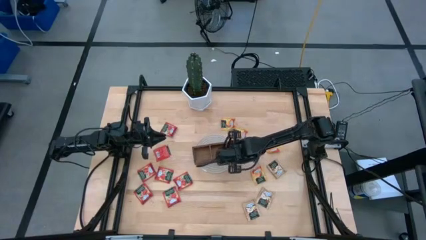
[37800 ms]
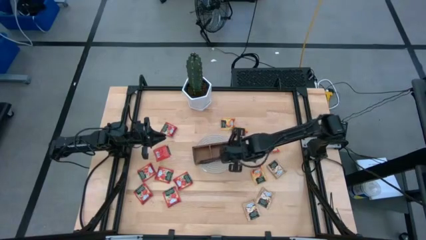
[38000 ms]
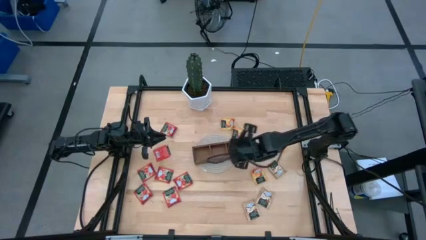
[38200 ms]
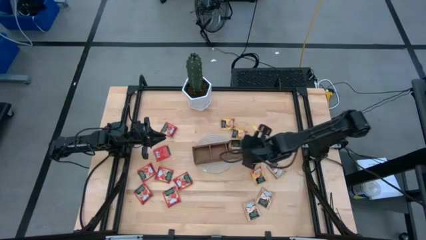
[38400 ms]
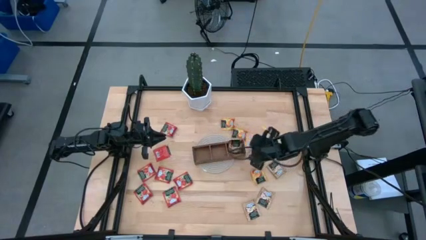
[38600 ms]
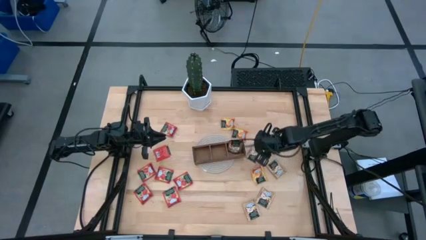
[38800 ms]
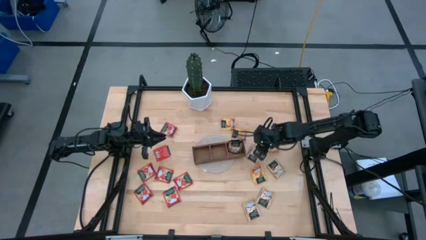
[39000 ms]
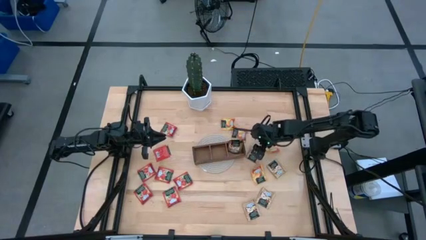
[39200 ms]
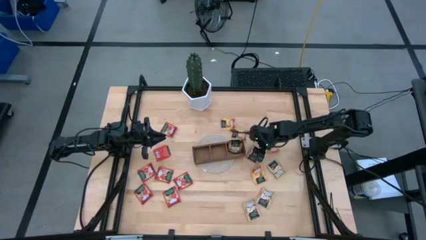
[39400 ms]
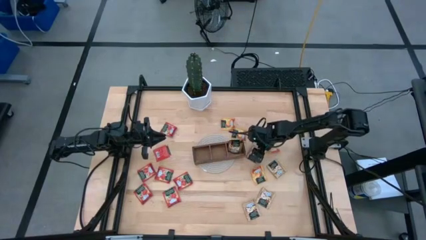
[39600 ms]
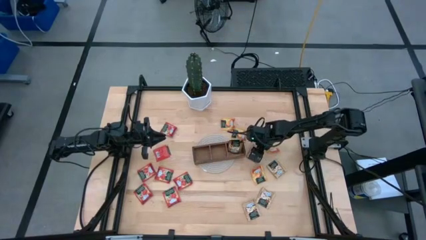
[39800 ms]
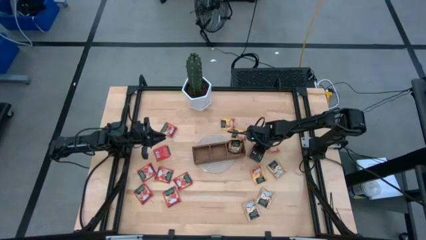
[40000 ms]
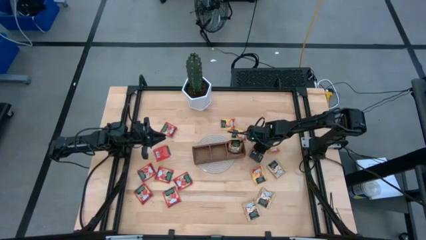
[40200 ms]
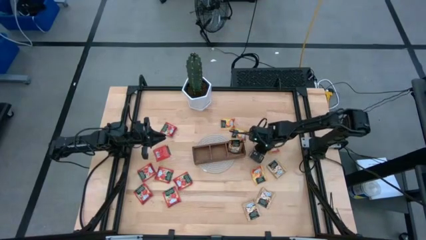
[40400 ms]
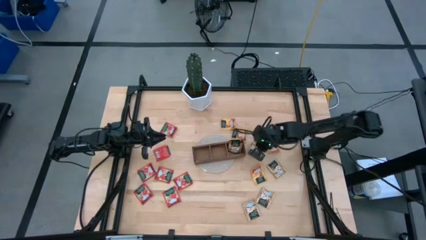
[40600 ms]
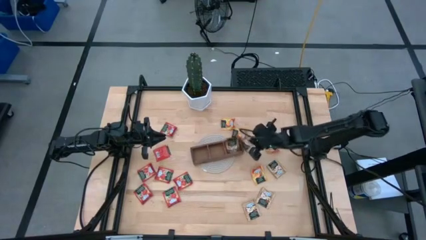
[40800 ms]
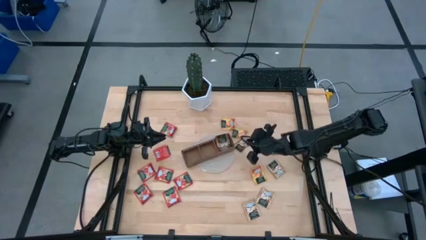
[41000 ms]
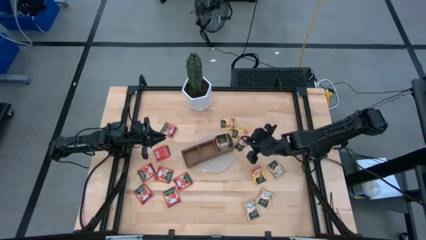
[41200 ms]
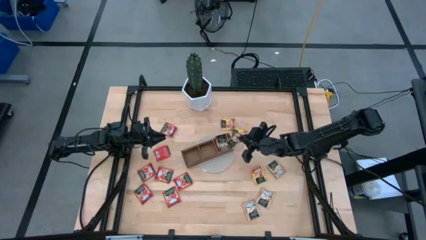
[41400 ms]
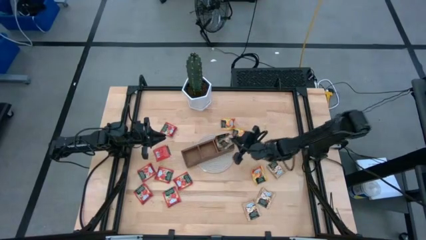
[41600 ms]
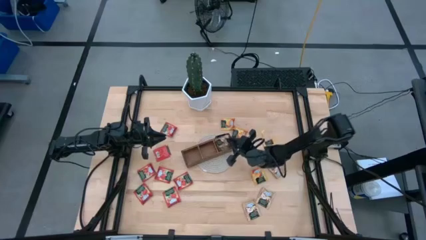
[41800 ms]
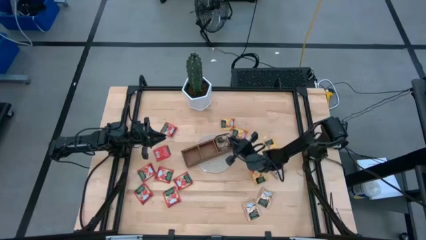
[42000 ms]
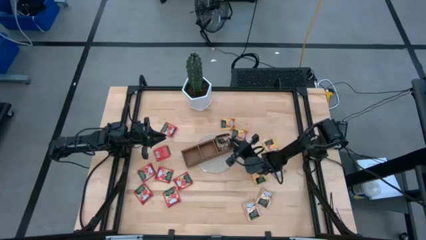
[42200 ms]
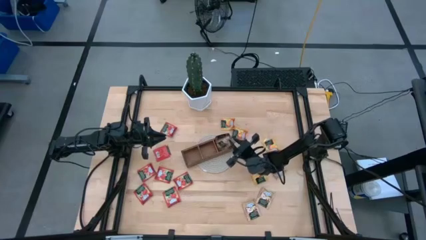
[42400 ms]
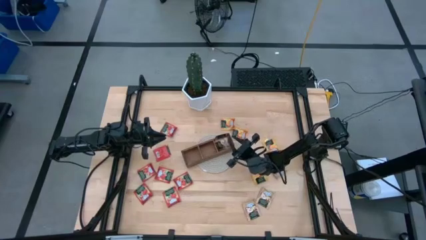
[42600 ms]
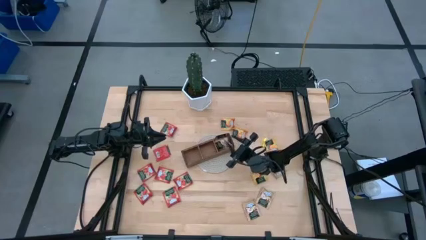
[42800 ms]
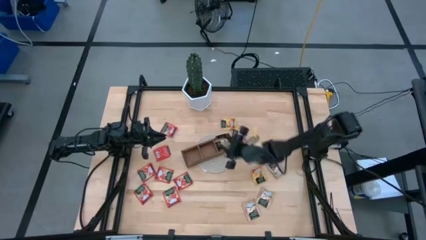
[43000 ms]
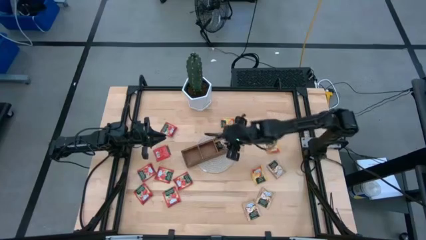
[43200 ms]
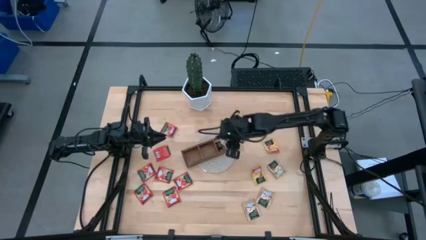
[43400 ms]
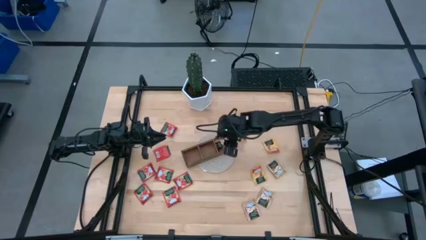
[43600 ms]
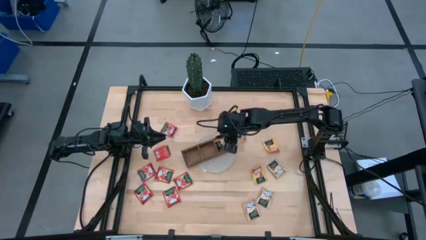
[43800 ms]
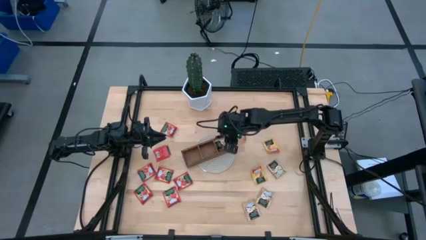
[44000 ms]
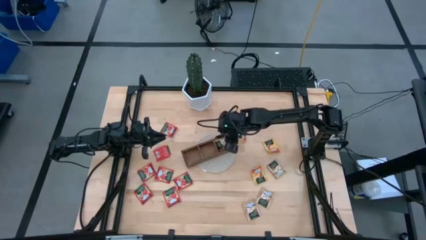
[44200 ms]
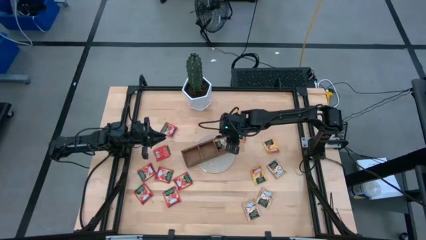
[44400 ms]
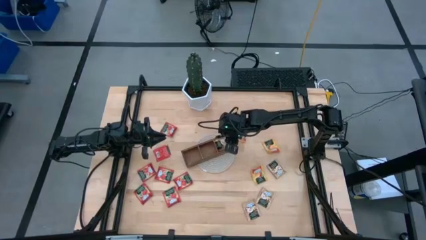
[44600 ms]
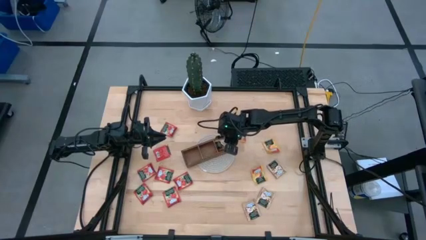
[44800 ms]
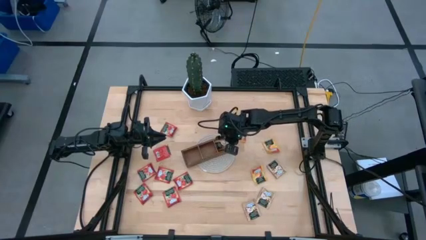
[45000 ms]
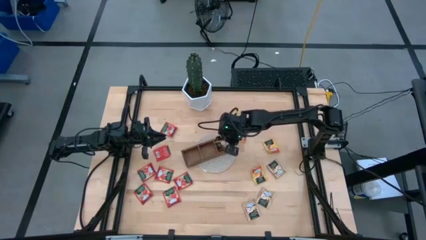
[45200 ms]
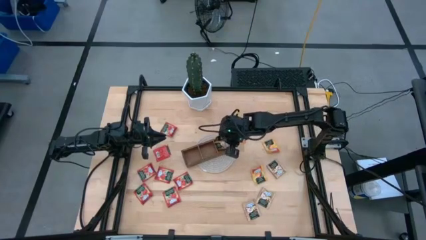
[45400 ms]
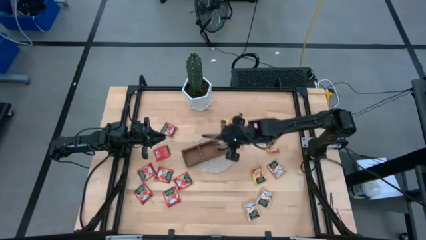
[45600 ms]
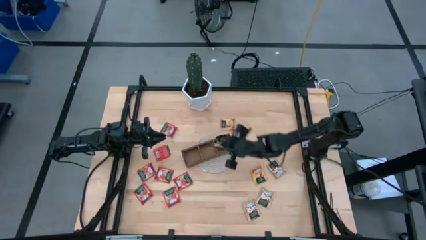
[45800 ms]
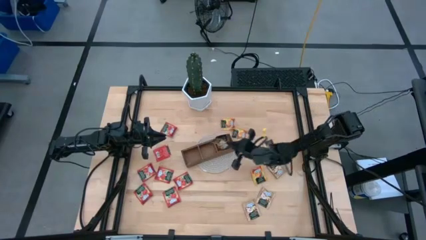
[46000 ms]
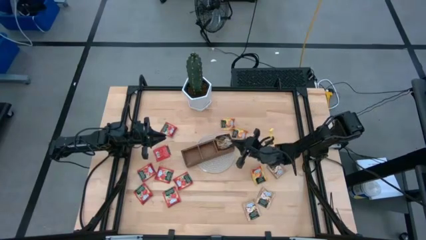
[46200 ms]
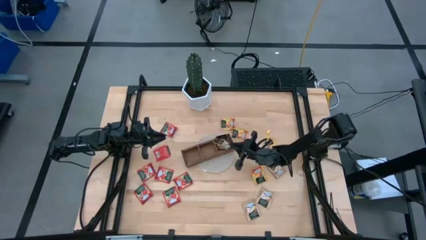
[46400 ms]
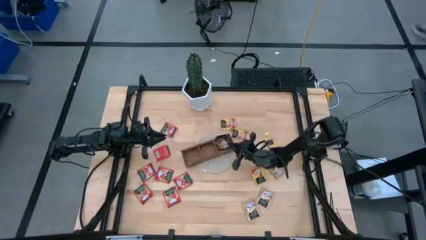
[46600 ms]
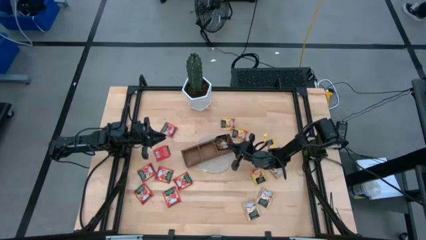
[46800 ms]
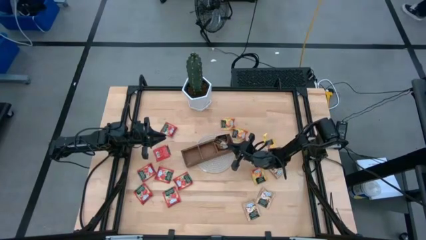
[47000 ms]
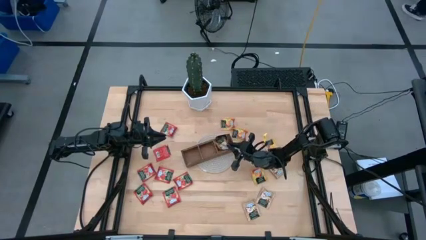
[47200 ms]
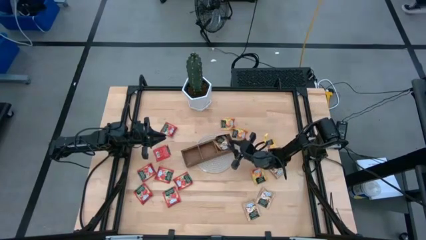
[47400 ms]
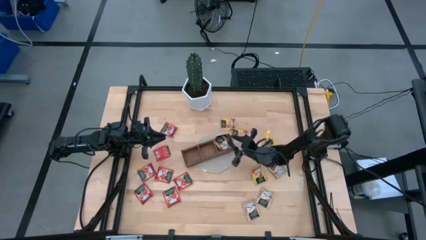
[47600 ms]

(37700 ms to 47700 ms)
Task: Pick & Place Tea
Put the brown tea bag into the right section of the wooden organizer

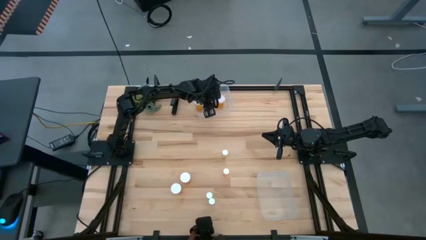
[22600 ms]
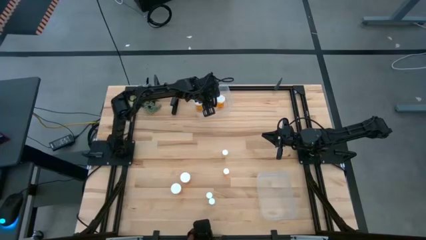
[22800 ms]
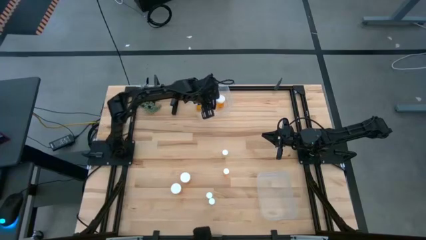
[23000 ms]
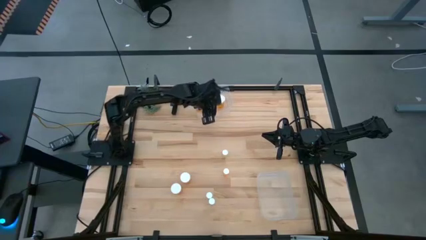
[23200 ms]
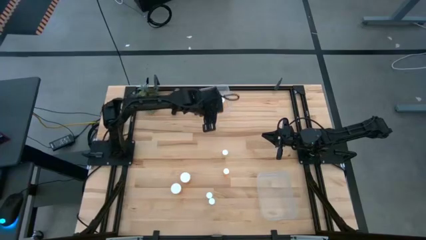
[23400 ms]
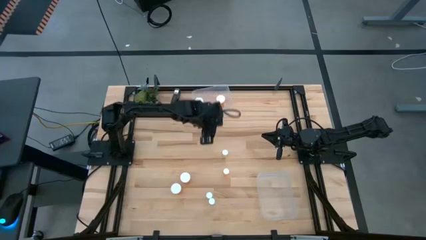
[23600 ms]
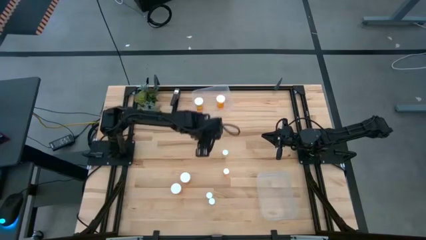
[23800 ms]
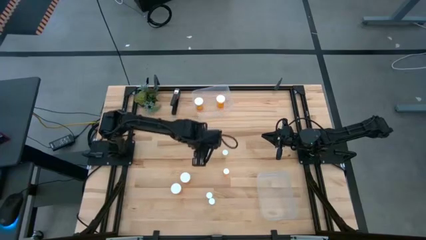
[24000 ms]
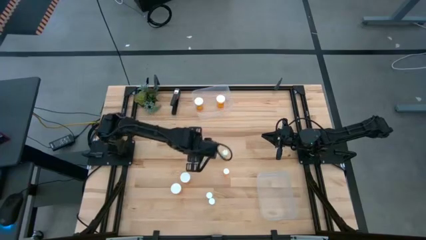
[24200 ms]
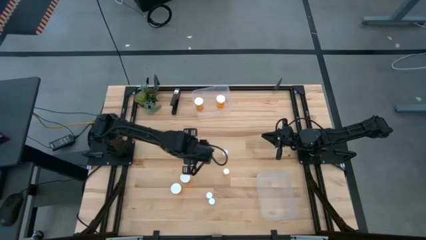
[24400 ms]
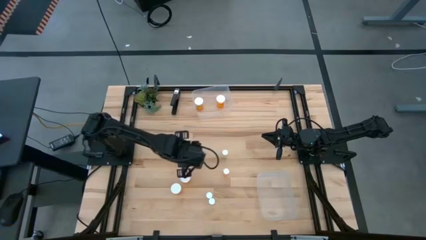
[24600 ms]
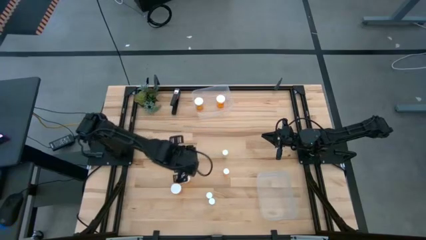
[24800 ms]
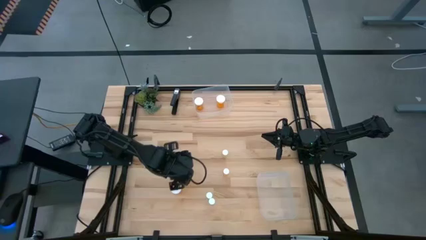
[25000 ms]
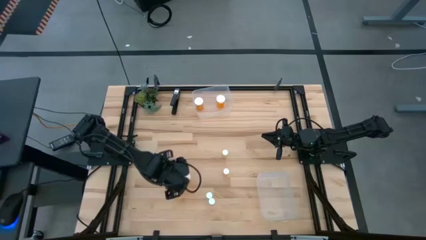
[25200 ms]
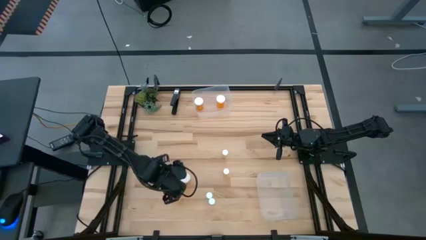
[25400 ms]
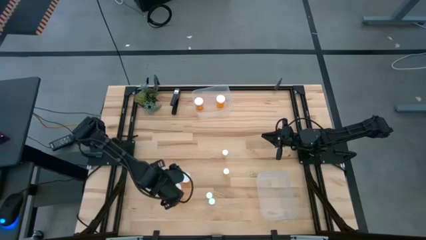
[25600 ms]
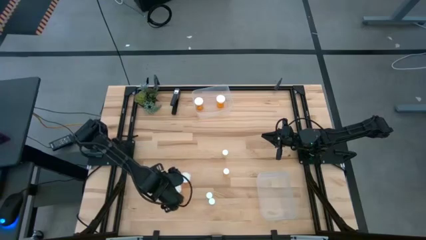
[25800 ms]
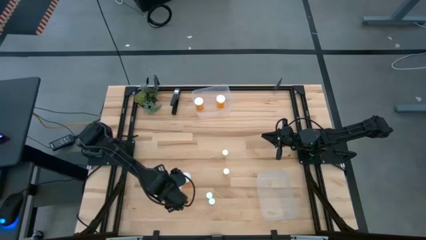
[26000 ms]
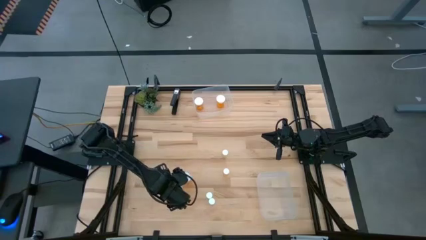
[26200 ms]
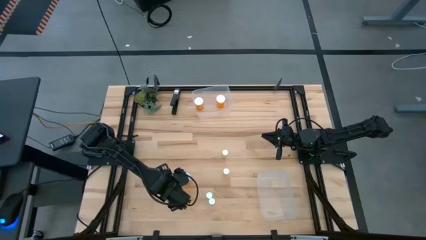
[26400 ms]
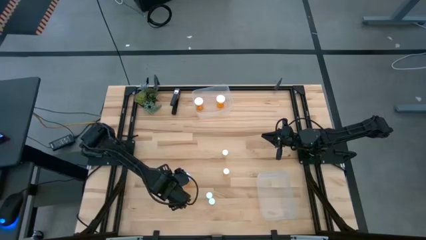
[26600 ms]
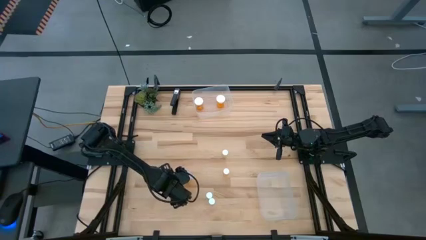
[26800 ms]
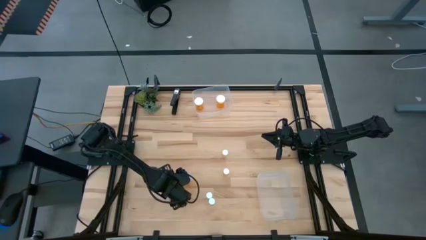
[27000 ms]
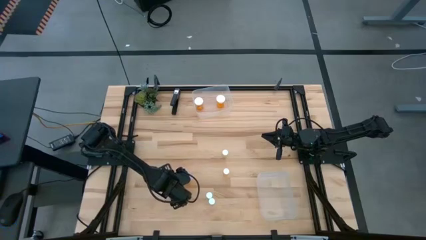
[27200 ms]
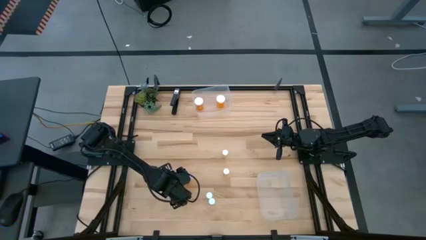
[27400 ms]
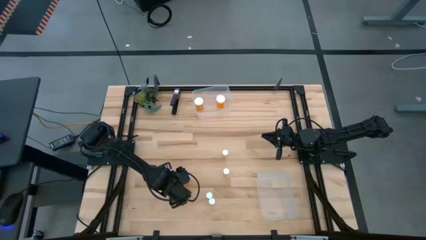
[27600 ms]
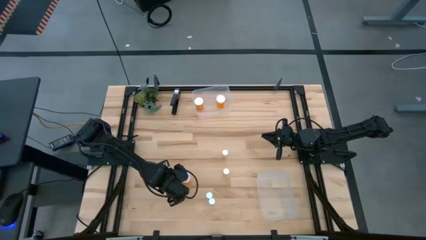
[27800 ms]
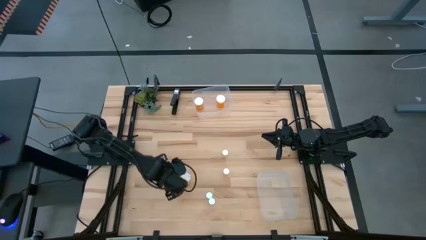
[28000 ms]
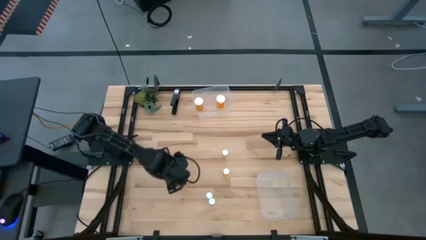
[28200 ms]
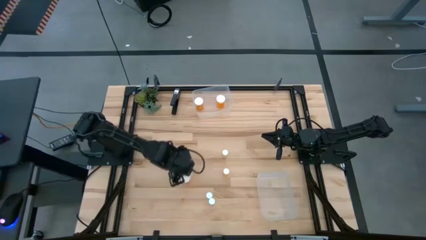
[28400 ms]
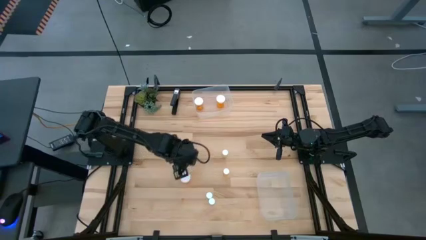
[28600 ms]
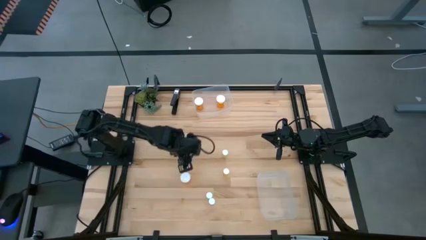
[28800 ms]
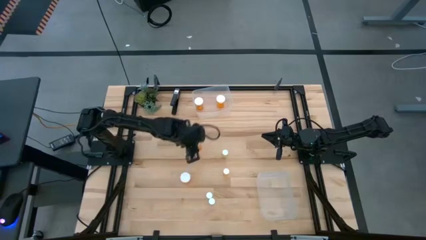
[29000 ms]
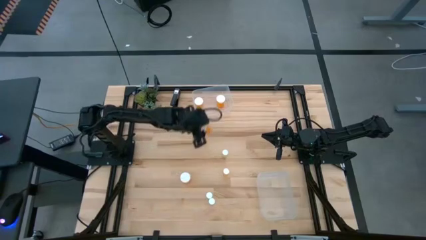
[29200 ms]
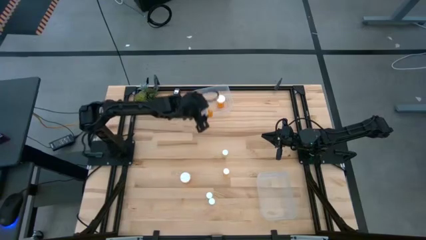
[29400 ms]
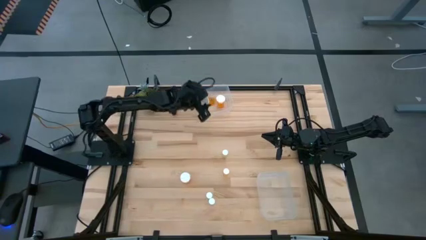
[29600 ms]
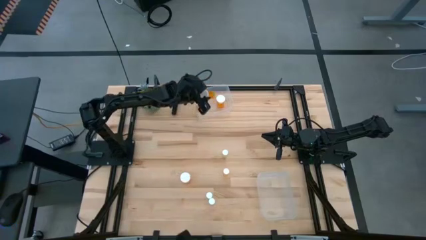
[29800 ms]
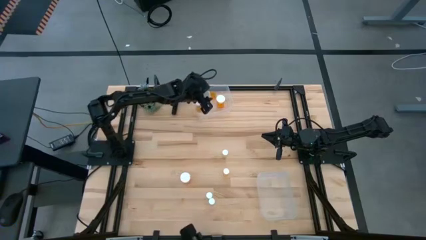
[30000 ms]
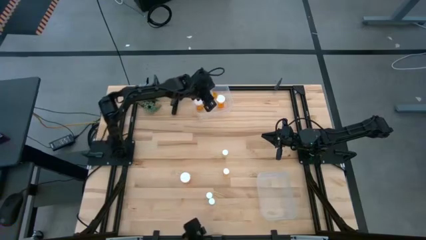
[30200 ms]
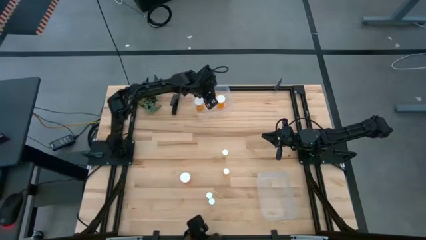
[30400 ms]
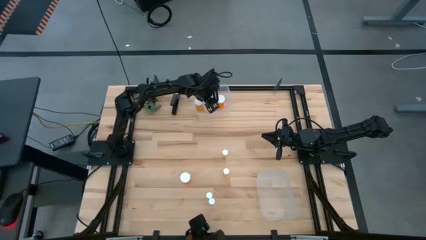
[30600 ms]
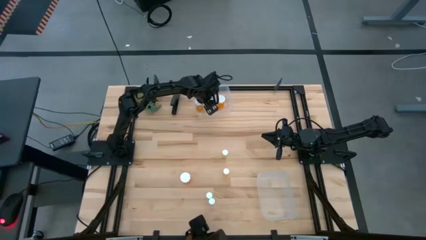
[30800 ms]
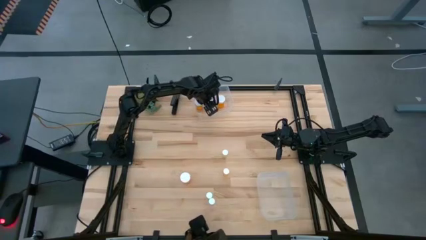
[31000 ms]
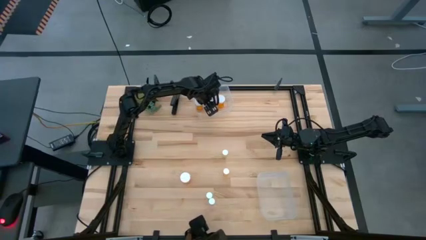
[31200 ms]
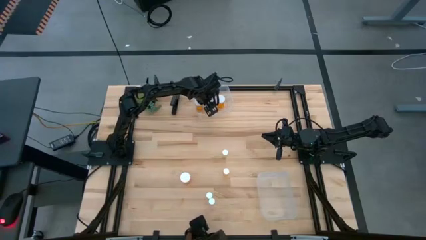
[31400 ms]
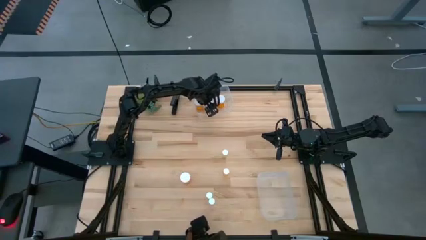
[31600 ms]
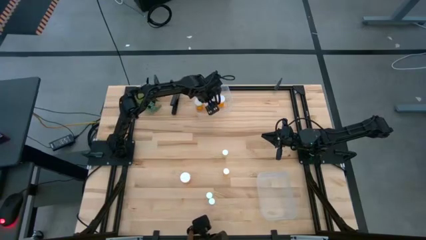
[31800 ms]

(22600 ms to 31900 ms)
Task: Pick and place medicine bottles into bin by pill shape (circle, oval)
Put the big orange pill bottle into the top transparent bin
